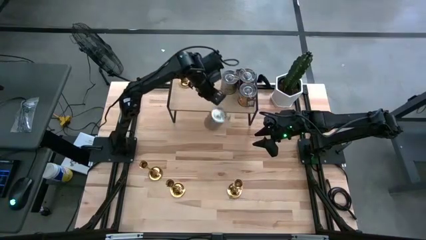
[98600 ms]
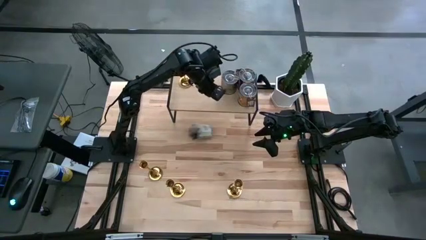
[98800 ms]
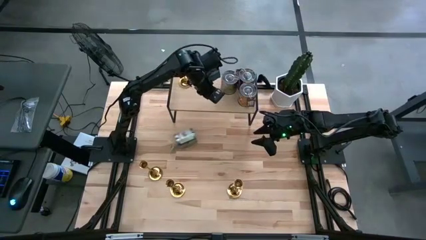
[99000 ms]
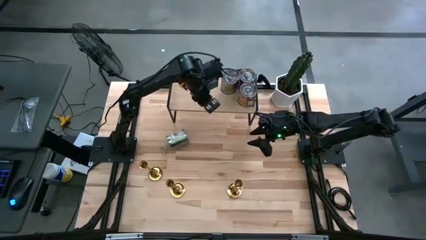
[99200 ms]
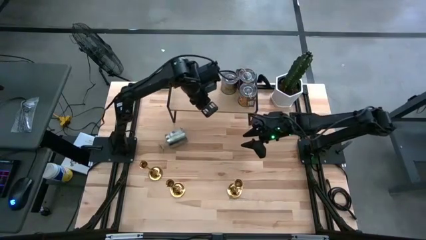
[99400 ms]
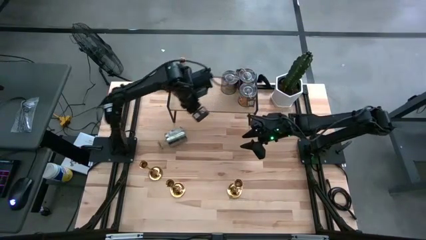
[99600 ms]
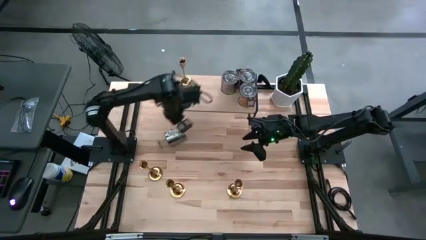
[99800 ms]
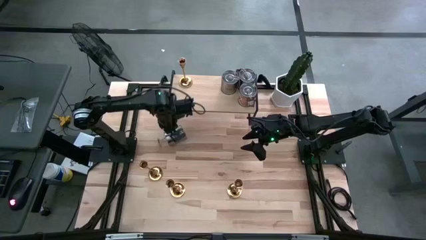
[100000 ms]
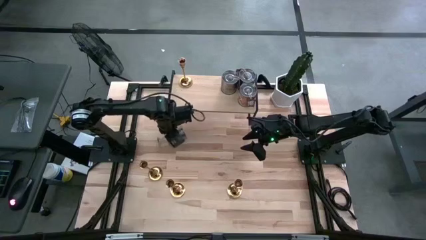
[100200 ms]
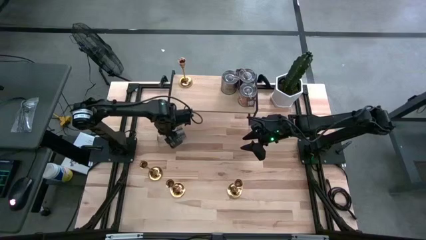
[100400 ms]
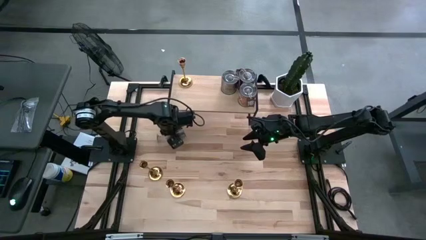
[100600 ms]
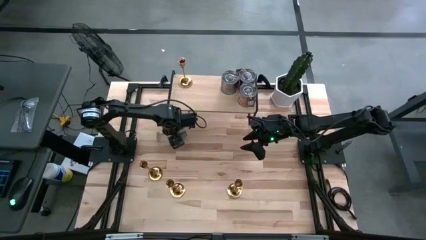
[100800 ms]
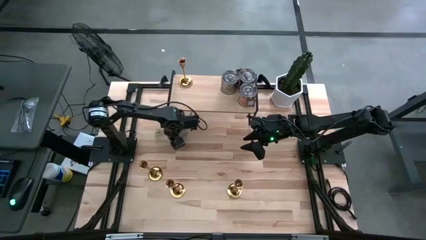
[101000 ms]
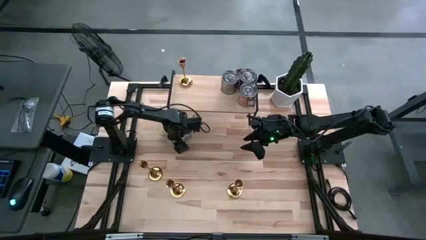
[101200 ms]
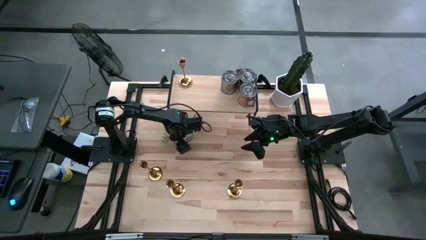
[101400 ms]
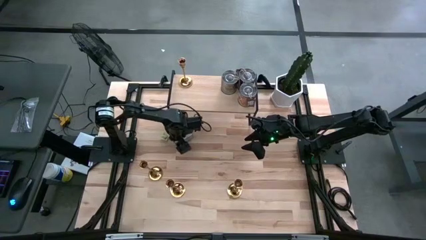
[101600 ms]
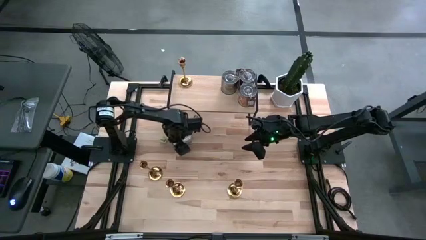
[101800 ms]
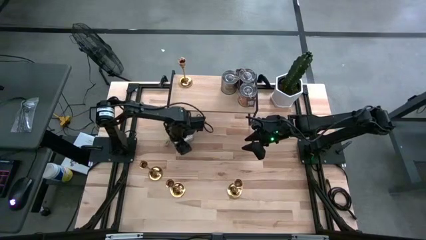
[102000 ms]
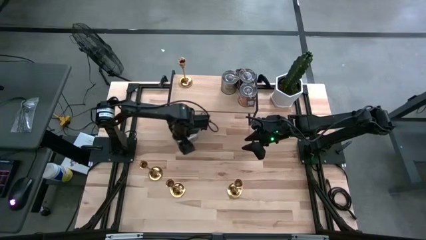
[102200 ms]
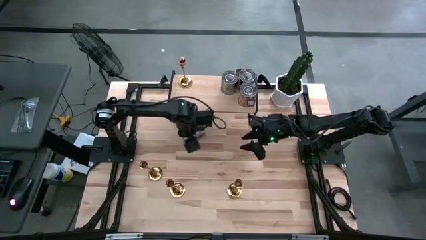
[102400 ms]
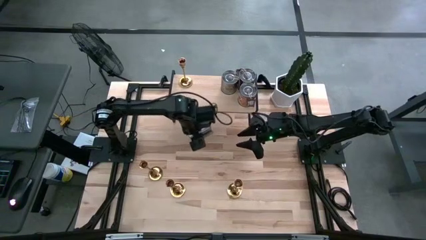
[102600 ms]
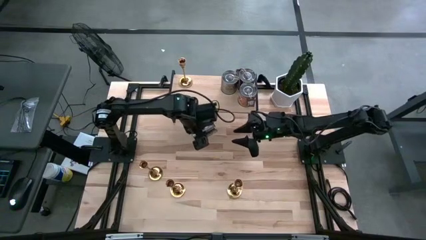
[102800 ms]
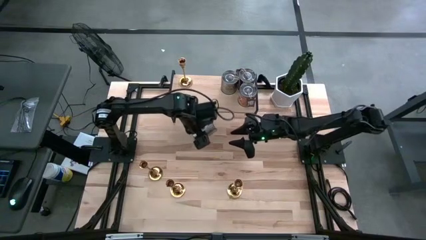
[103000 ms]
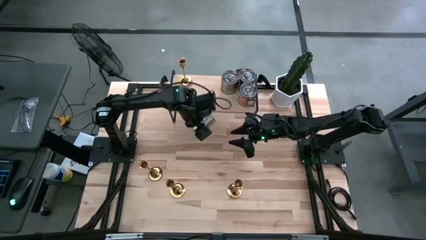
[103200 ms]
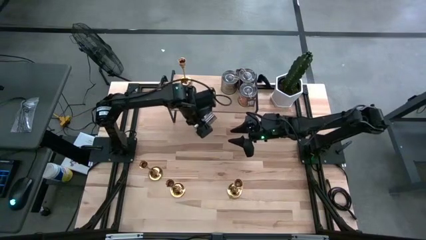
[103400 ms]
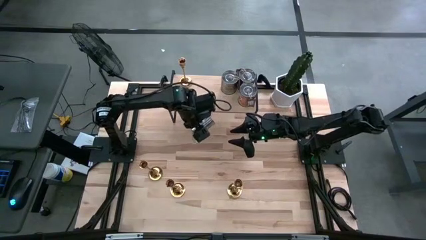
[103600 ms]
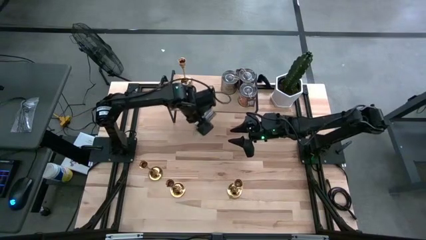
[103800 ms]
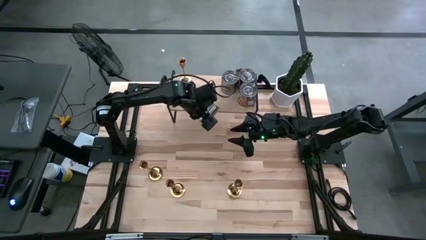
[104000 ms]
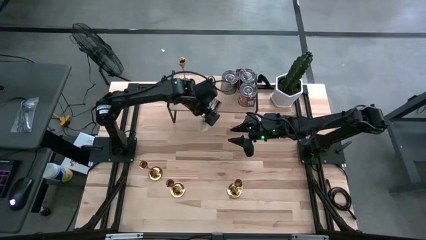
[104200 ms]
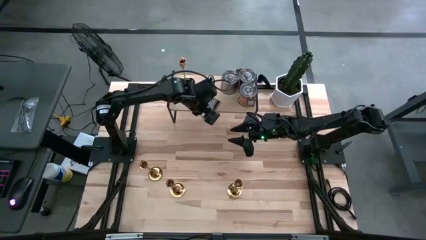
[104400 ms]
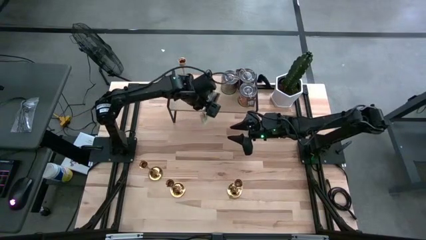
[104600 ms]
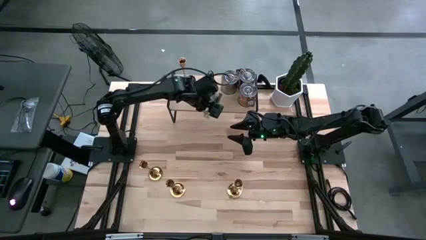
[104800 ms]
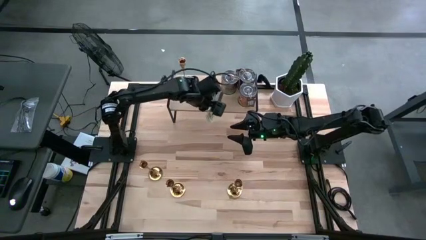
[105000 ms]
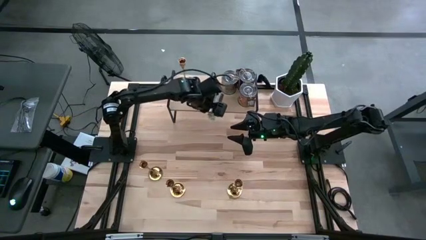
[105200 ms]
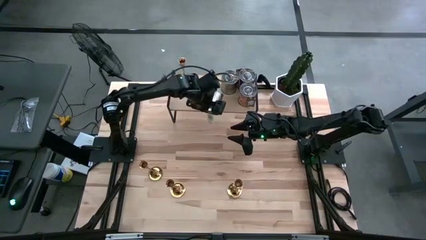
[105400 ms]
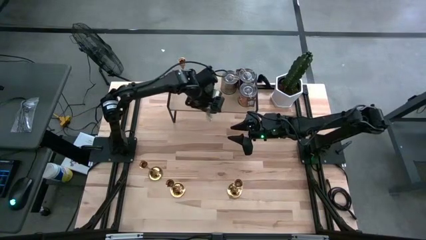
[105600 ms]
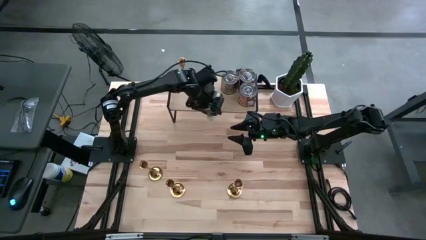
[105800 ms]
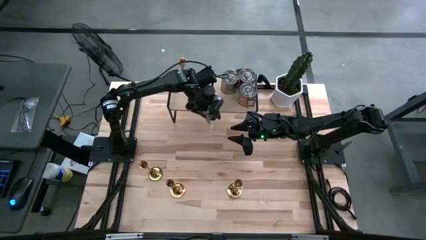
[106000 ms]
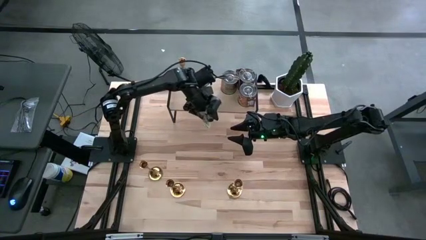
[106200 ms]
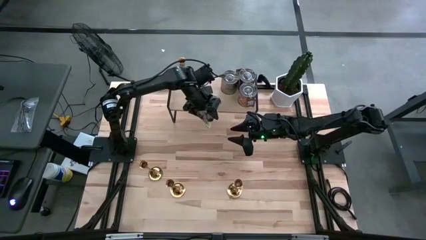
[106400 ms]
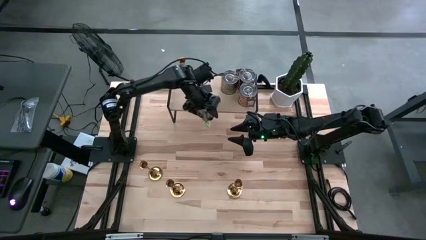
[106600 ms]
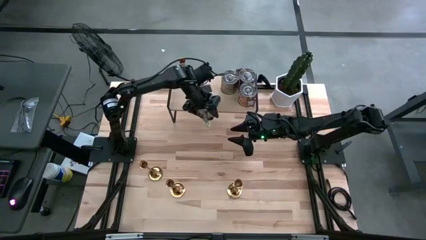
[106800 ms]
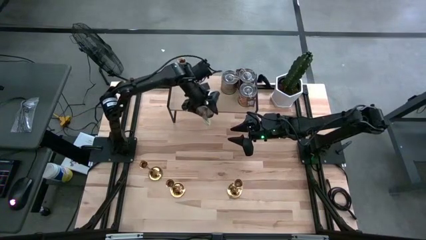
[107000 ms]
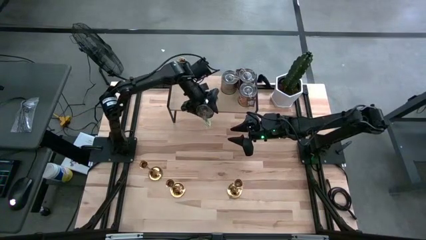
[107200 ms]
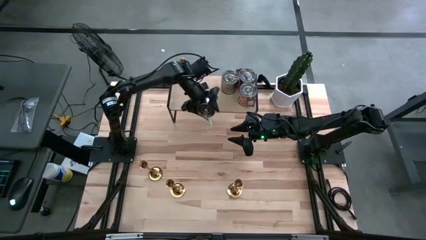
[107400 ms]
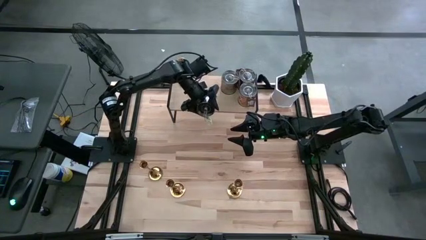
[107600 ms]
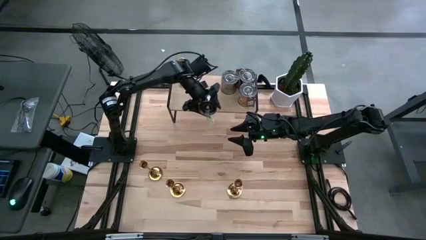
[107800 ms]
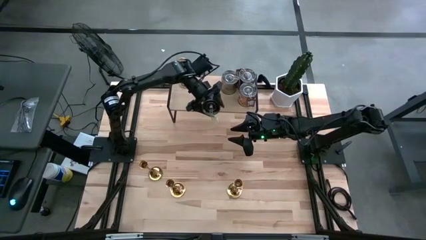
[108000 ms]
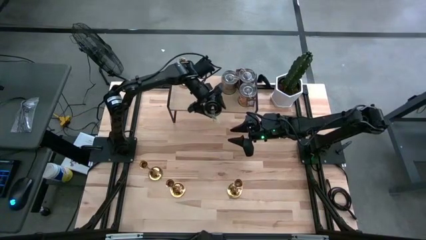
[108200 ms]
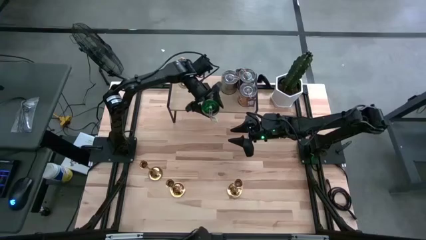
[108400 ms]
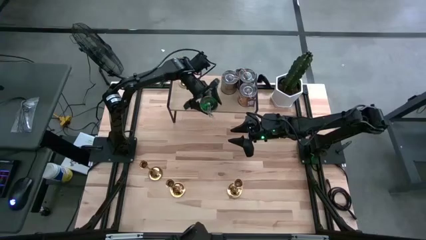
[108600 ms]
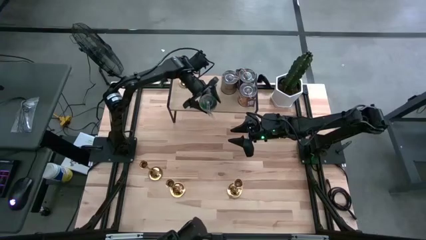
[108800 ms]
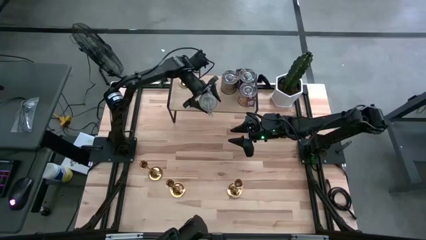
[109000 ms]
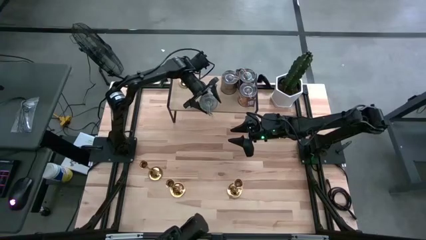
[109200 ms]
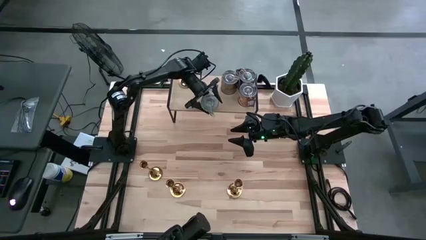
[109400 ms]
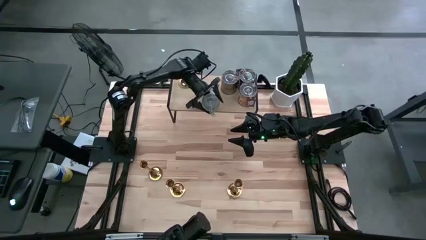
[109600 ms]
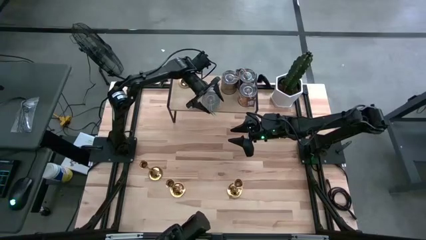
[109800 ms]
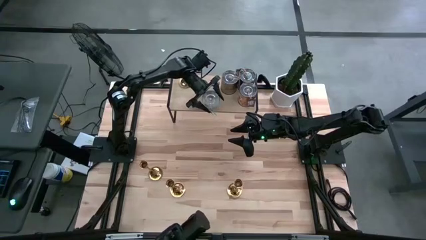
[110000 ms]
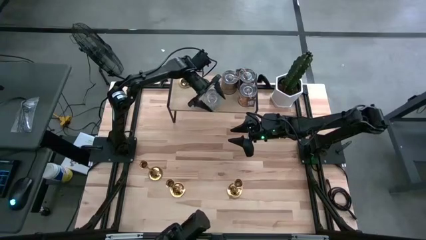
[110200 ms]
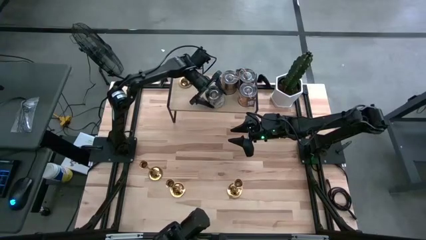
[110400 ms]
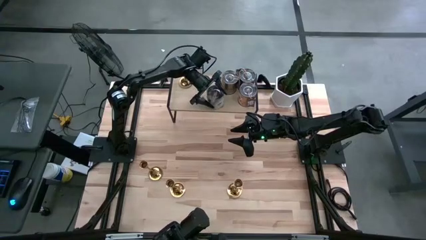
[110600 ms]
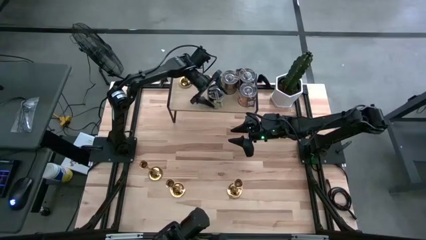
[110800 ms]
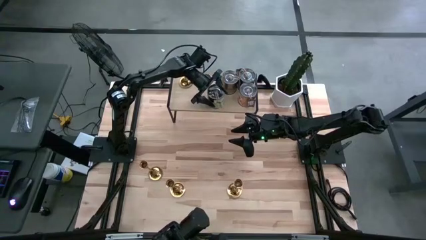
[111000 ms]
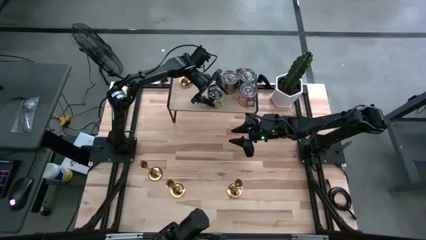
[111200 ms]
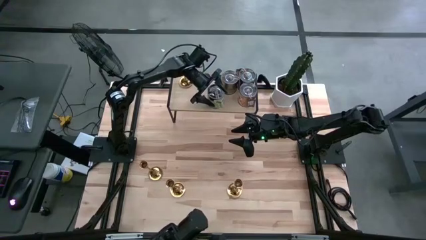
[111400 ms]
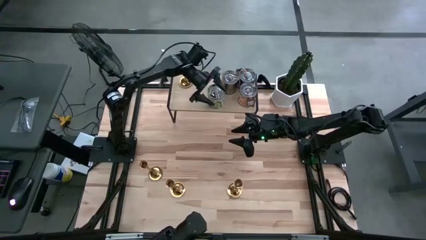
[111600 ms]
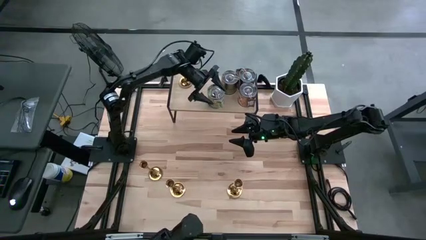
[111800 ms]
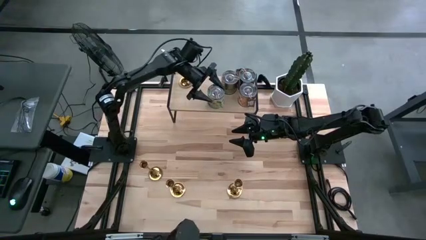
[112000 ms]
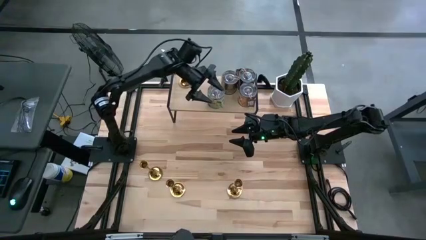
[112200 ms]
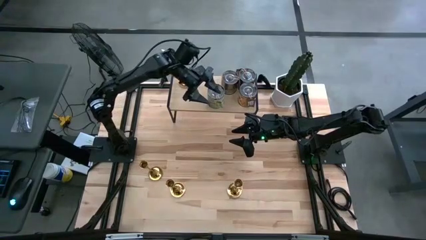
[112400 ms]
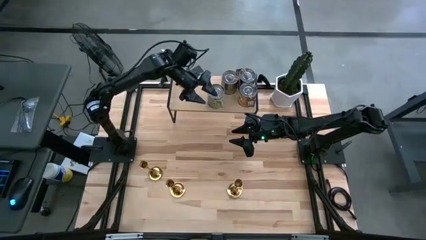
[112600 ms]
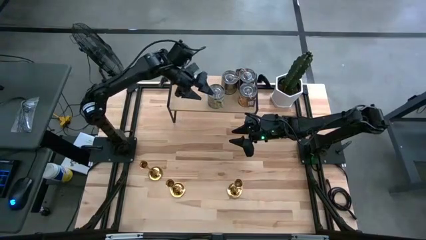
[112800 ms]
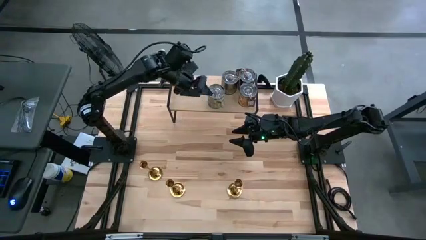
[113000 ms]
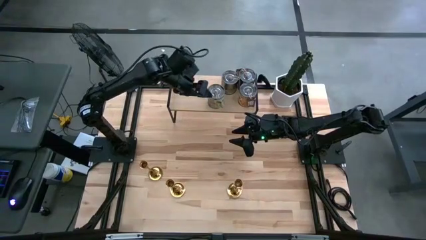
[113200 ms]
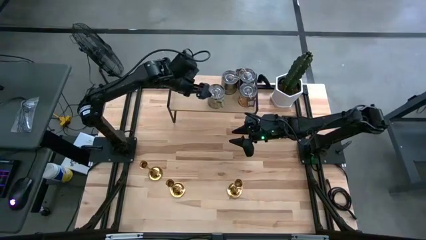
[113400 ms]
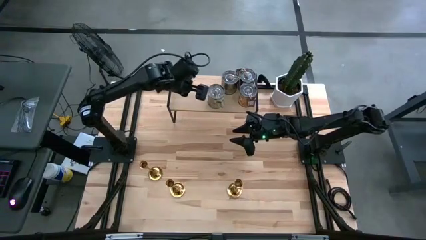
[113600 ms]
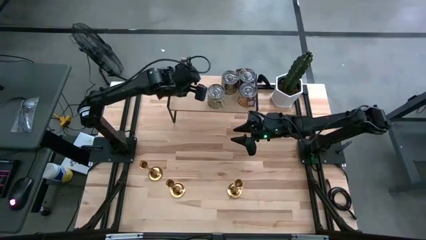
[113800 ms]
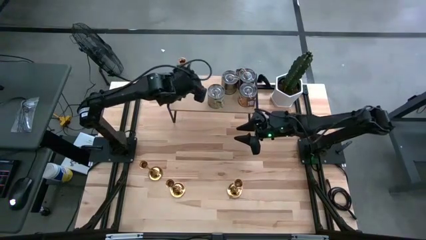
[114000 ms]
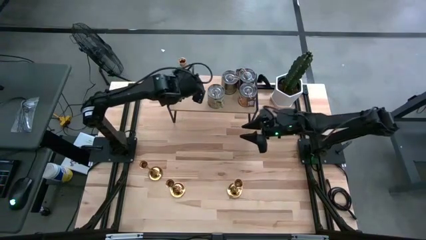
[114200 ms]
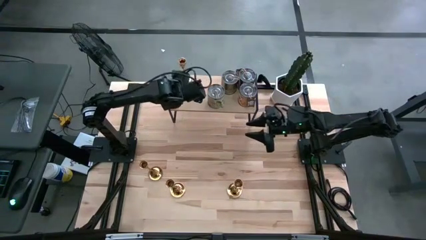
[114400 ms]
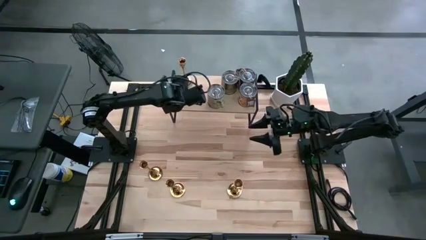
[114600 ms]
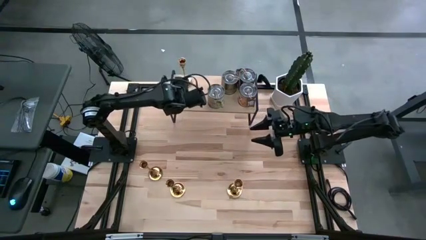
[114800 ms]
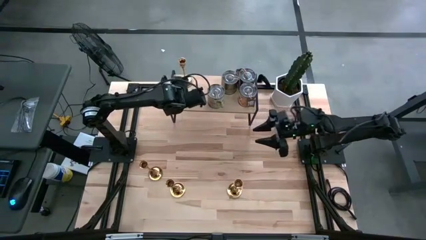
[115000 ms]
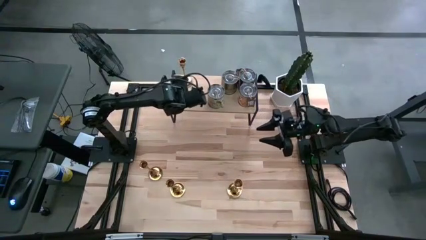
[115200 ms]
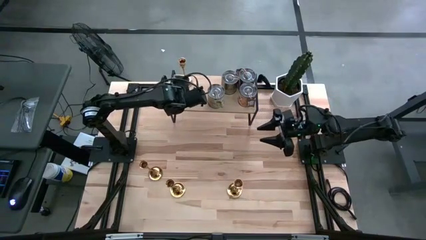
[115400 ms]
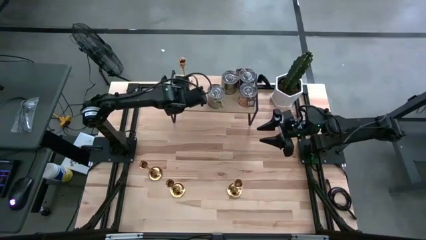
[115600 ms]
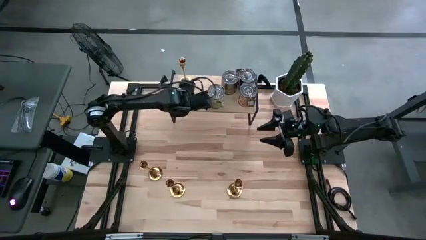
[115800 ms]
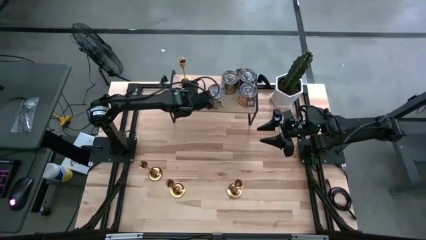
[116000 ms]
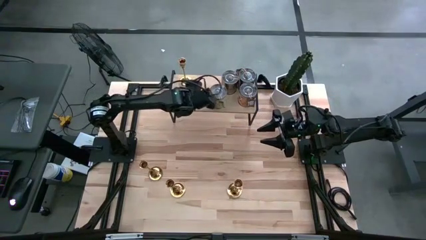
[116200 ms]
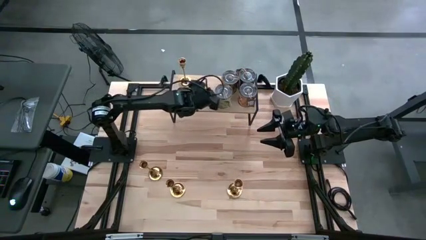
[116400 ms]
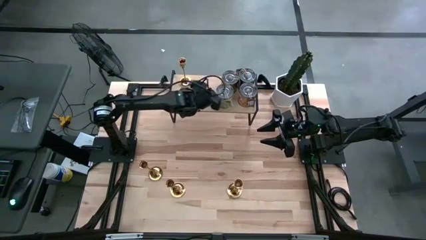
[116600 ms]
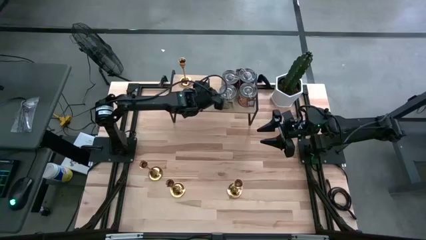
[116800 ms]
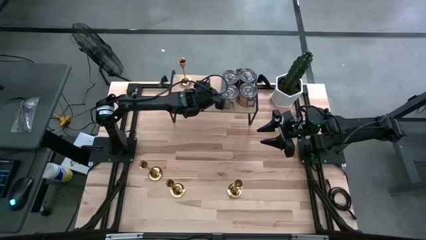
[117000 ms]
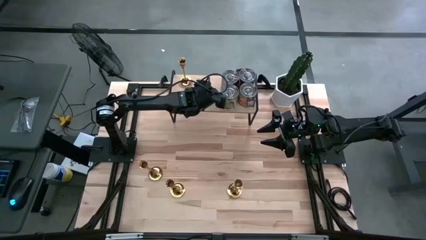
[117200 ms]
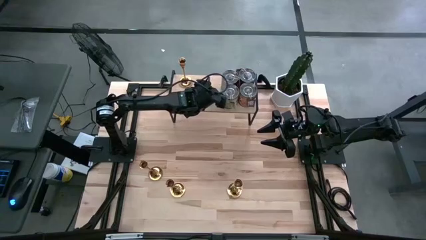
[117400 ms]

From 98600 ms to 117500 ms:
Task: Pick & Place candle stick holders
Put the silver scented candle on the shelf
